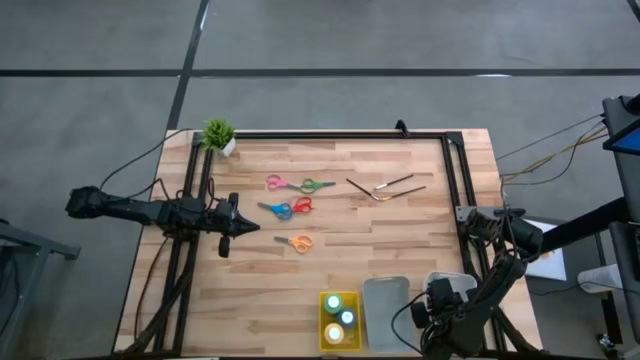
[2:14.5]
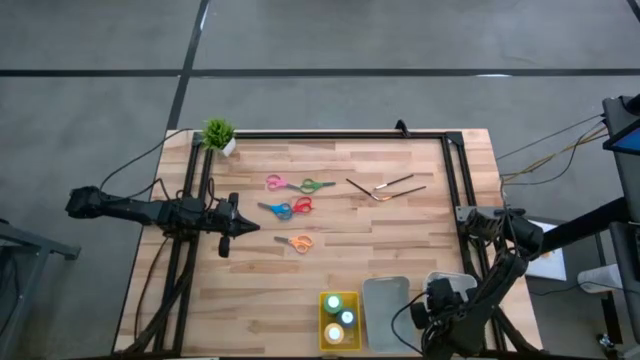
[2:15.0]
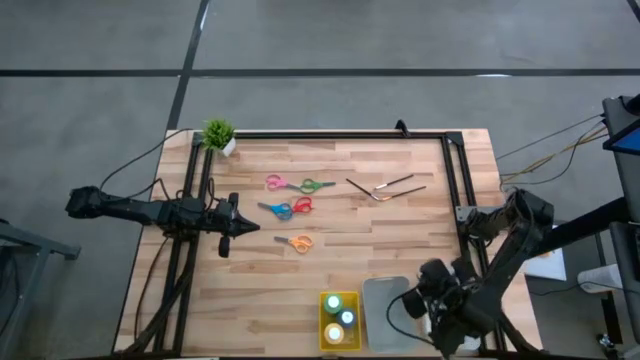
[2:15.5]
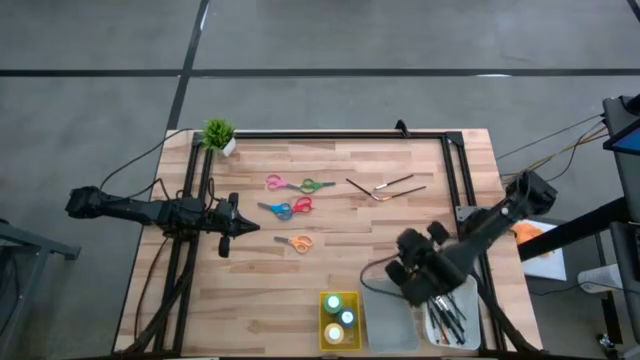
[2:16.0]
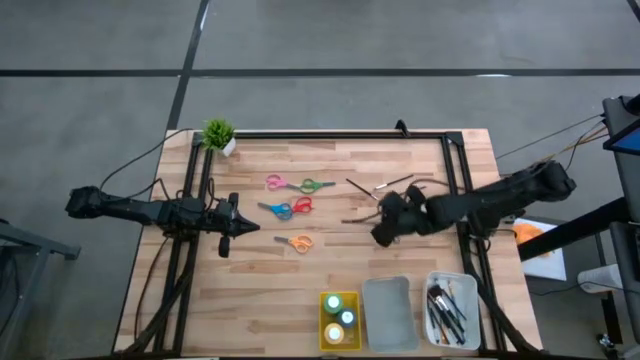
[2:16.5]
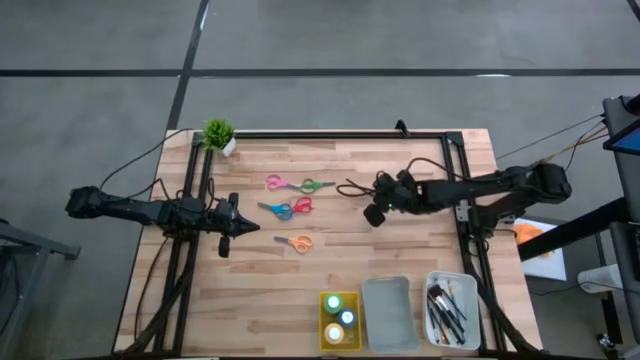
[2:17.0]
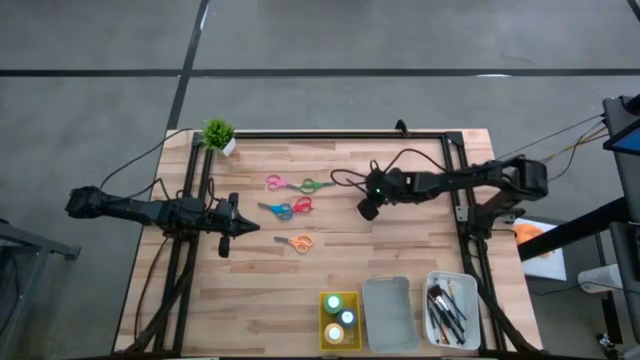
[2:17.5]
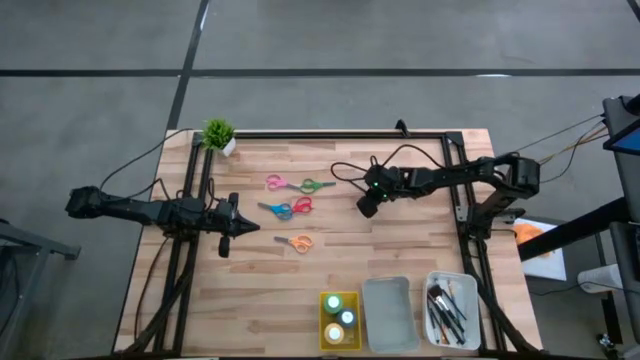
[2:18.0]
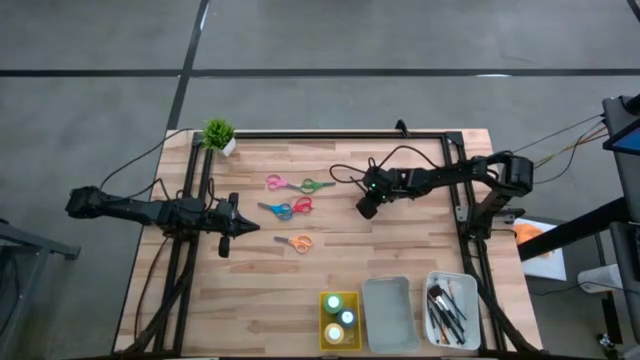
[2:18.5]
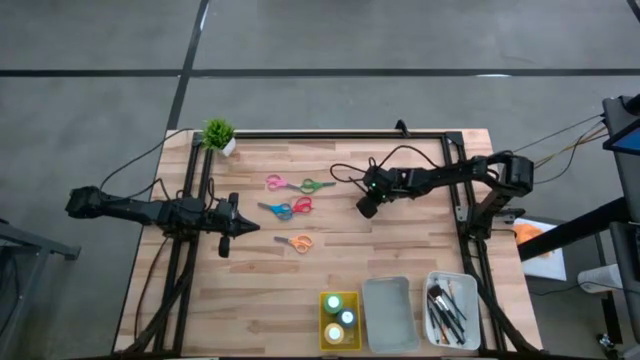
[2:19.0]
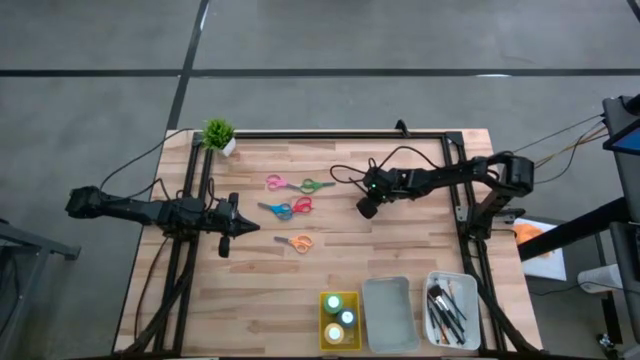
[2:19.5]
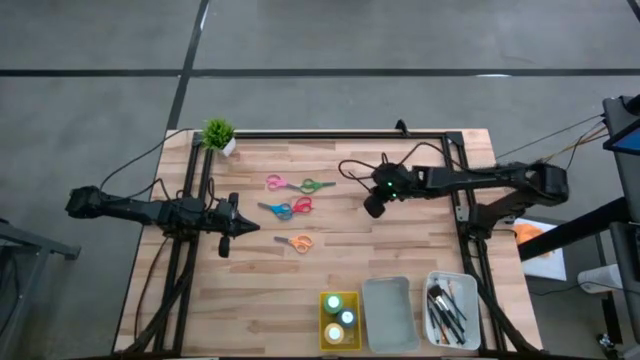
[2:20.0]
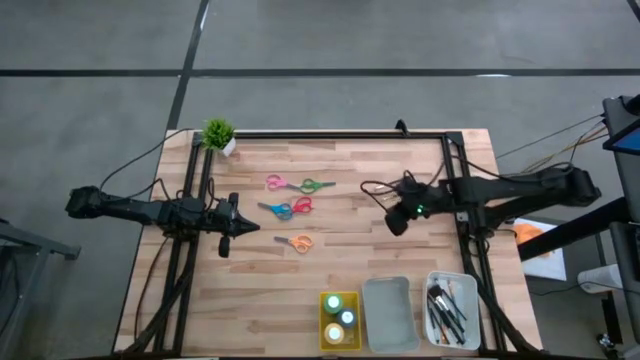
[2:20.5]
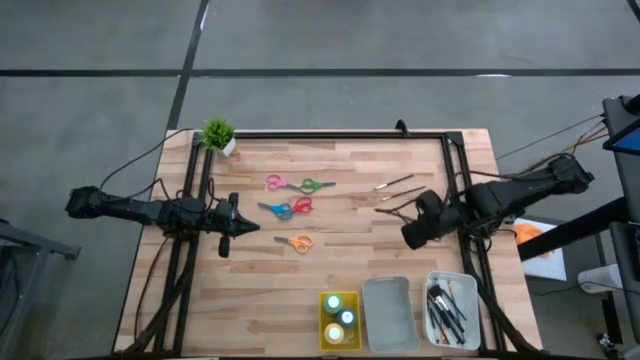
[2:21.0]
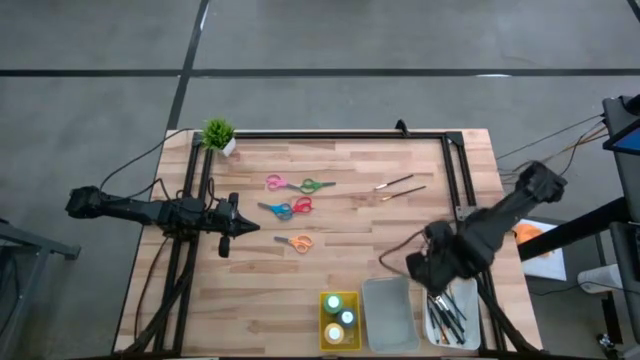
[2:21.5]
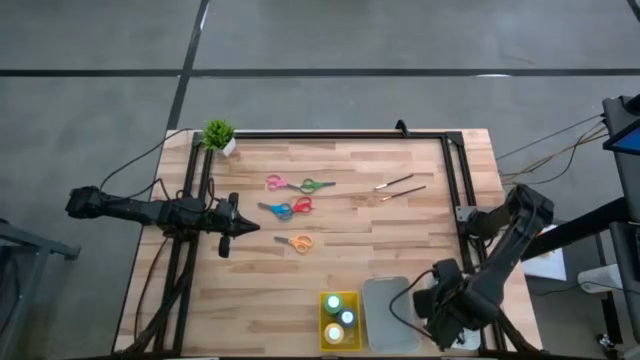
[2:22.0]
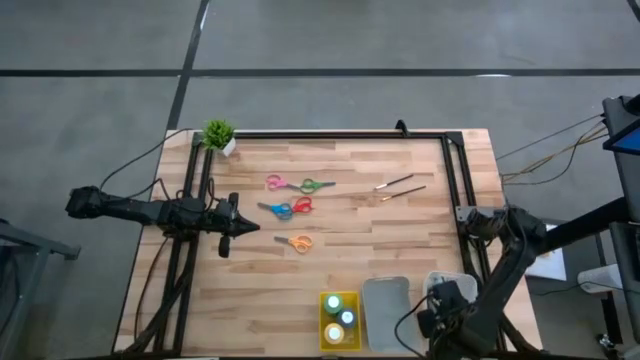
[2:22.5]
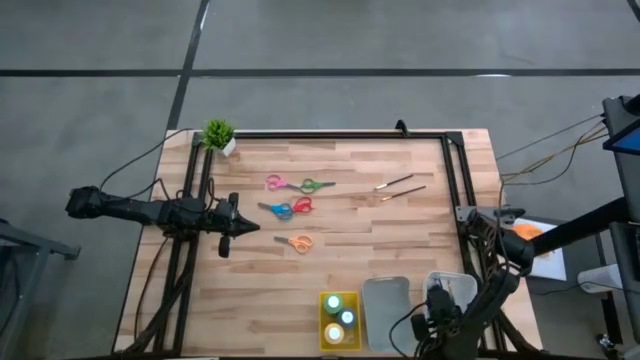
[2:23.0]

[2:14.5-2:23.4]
Task: Pick & Place Paint Supplies
Put the silver brush into the white bin

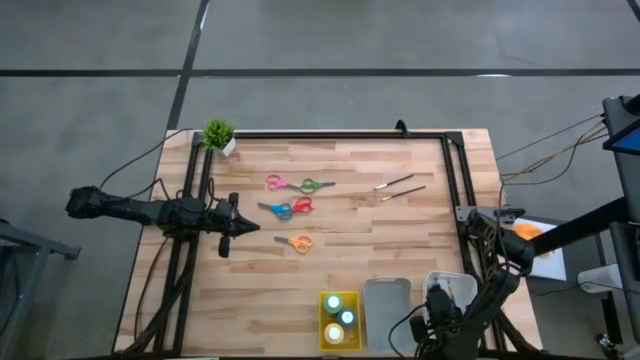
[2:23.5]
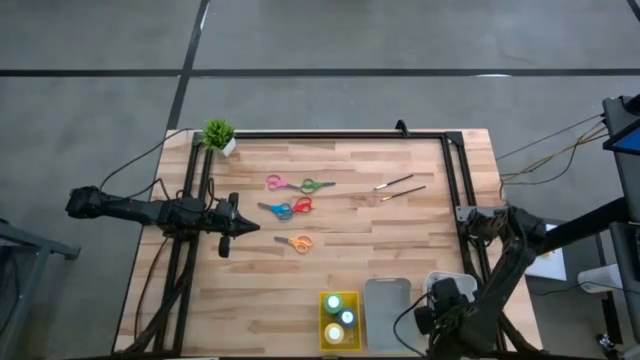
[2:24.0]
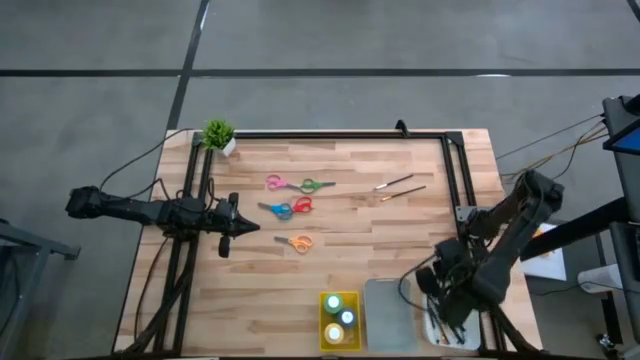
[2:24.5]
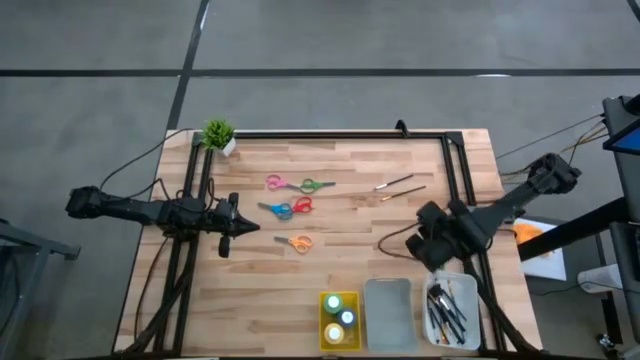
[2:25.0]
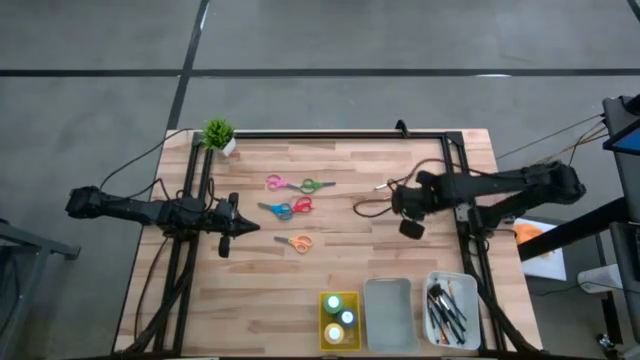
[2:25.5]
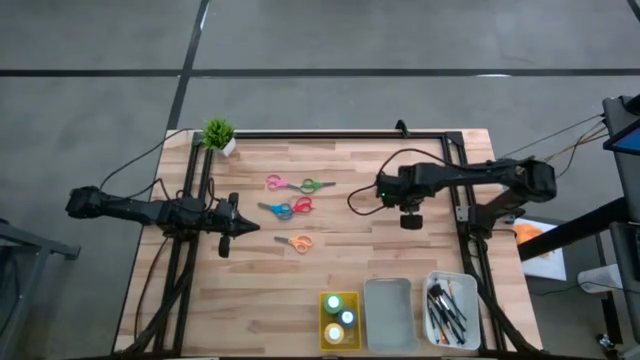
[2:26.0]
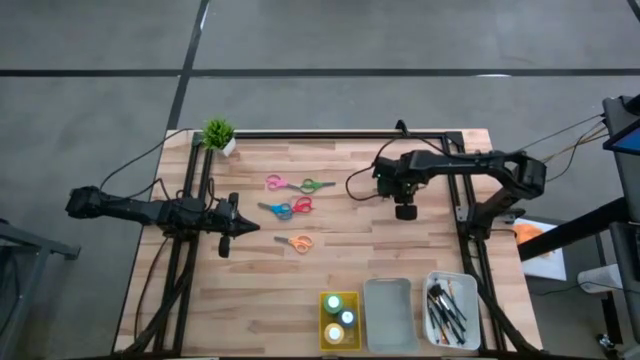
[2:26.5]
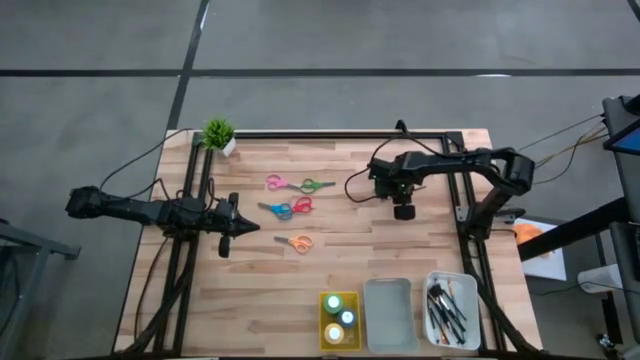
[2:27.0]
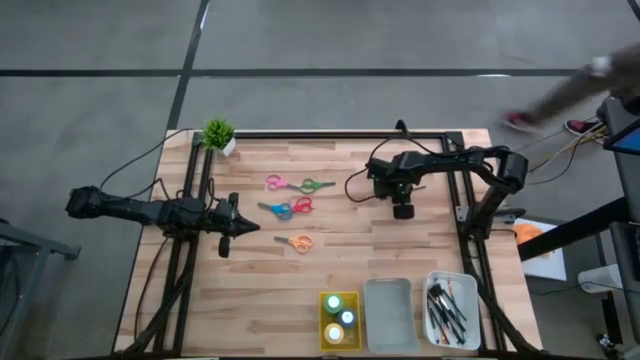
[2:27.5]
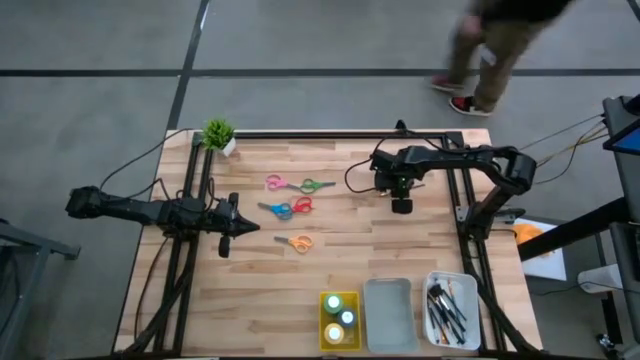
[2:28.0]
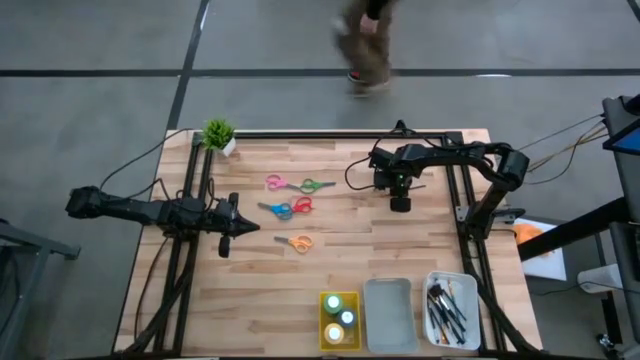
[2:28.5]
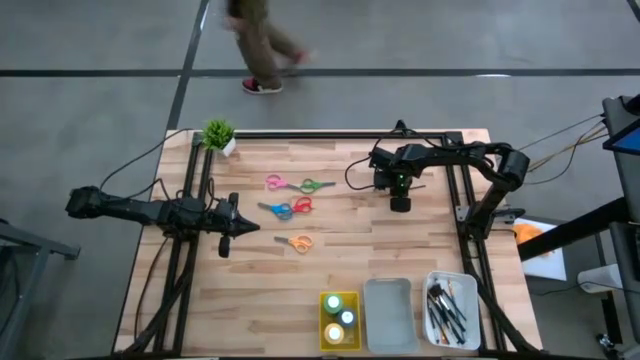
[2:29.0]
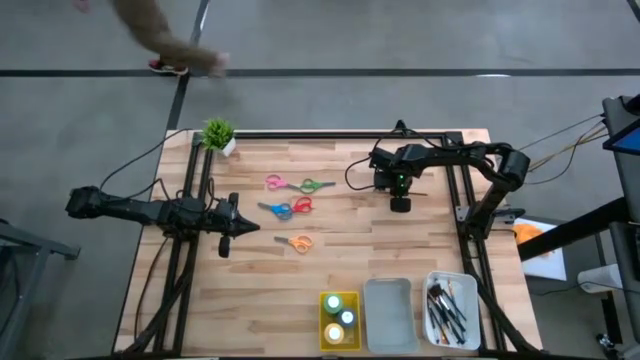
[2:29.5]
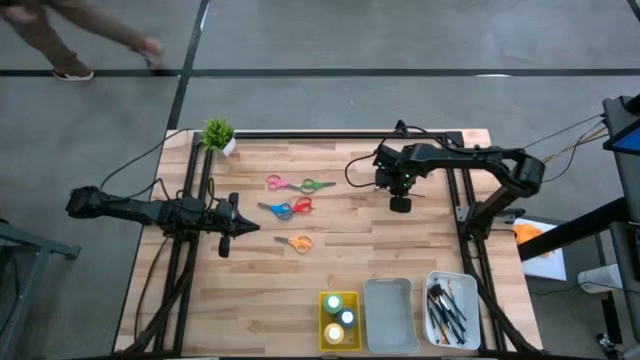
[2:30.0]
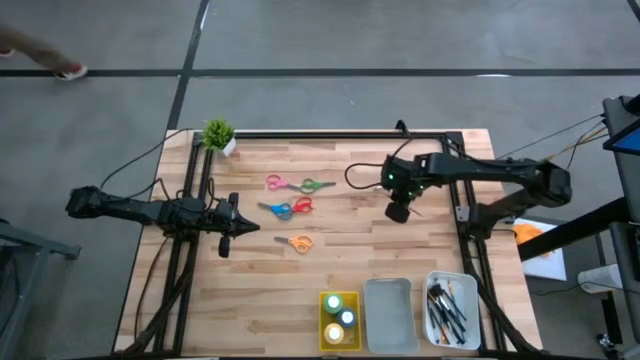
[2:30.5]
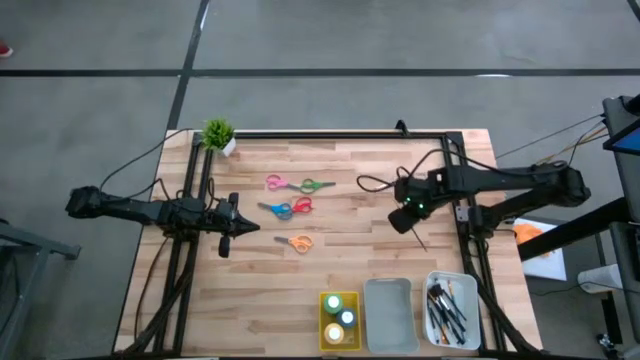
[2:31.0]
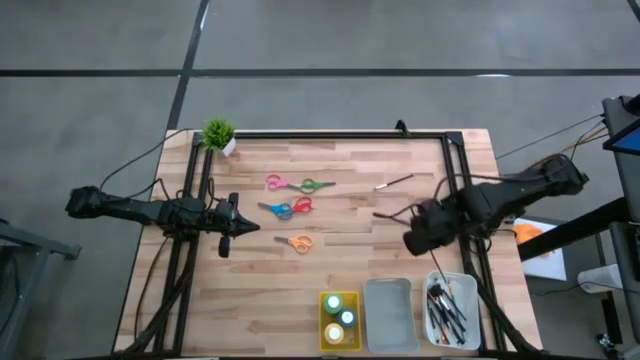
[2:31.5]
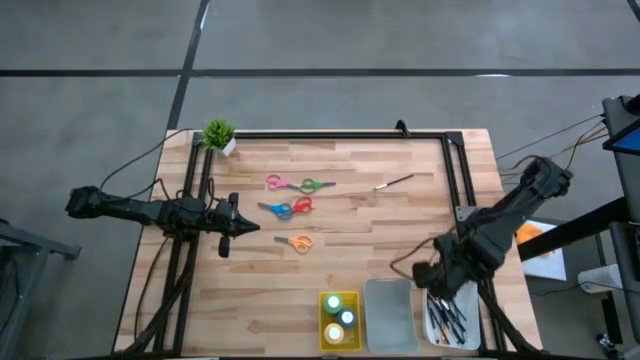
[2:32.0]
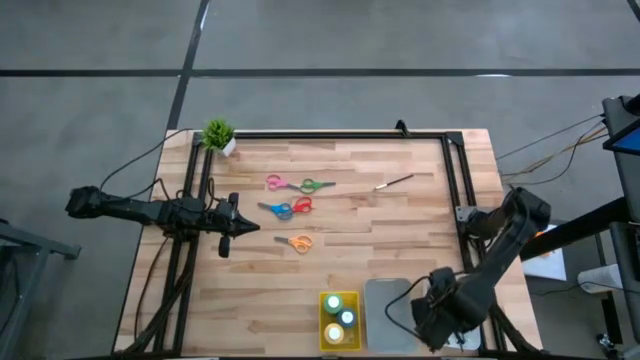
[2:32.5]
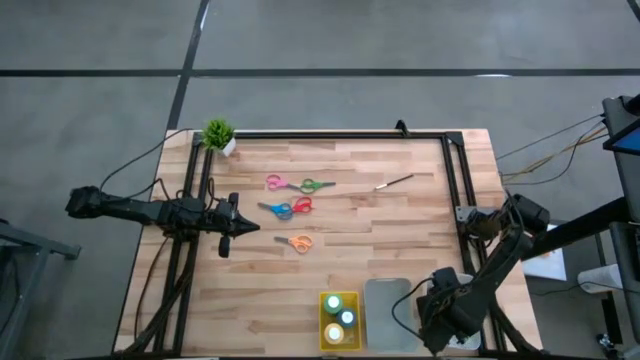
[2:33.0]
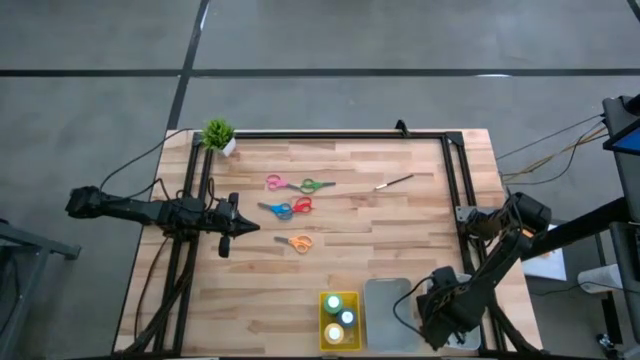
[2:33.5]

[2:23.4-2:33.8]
Put the gold paint brush into the white bin
